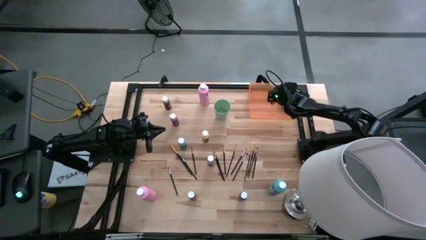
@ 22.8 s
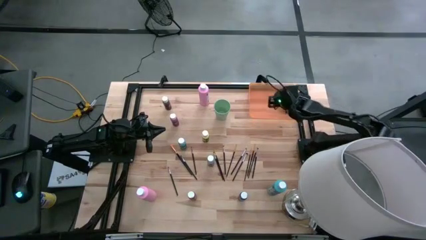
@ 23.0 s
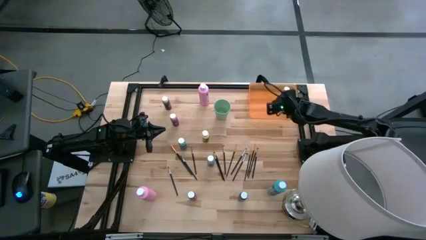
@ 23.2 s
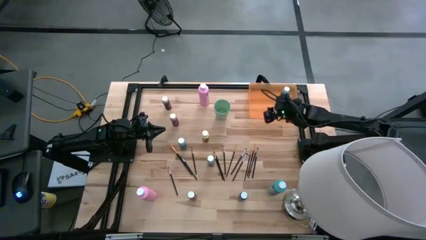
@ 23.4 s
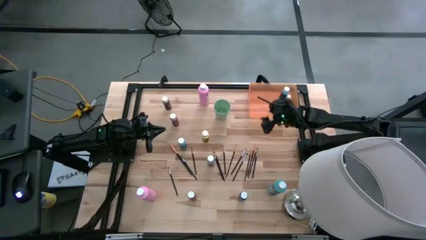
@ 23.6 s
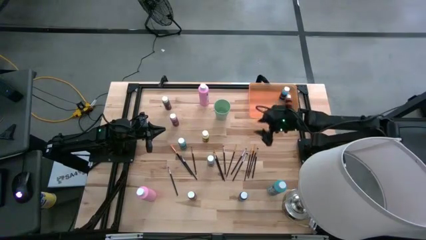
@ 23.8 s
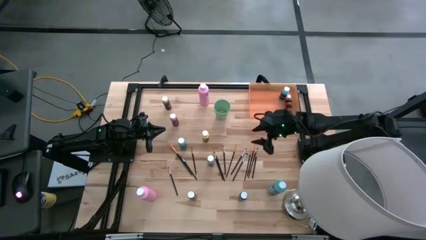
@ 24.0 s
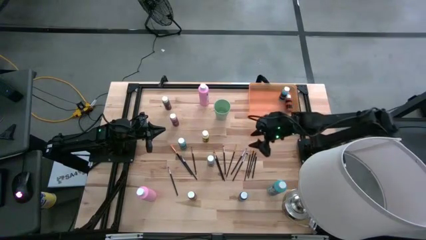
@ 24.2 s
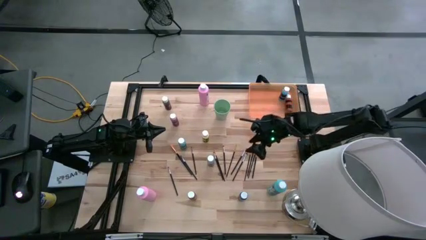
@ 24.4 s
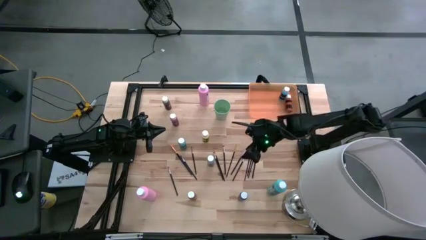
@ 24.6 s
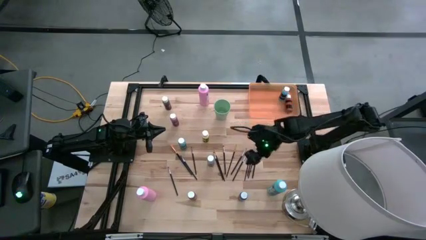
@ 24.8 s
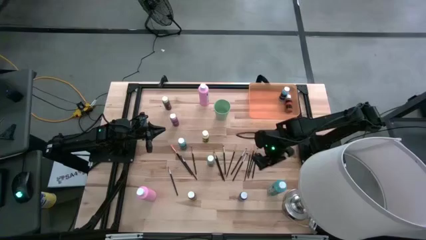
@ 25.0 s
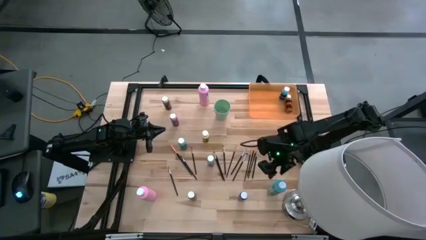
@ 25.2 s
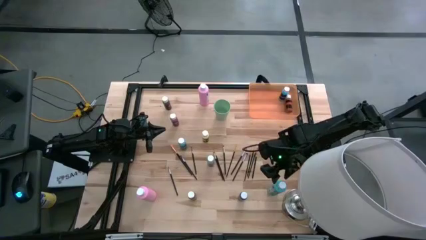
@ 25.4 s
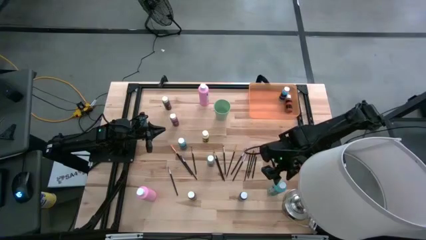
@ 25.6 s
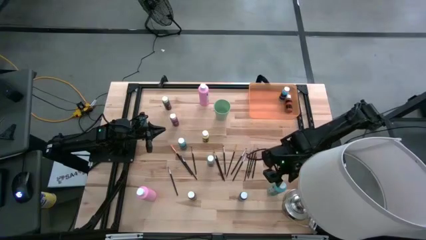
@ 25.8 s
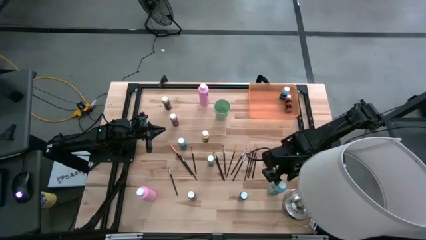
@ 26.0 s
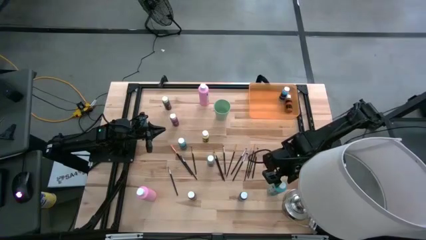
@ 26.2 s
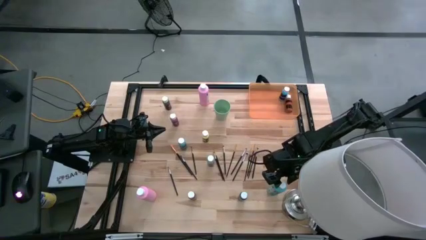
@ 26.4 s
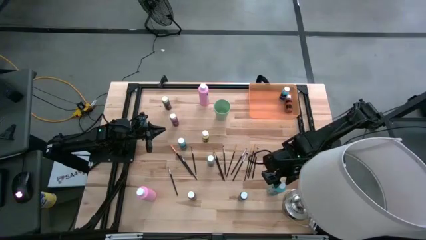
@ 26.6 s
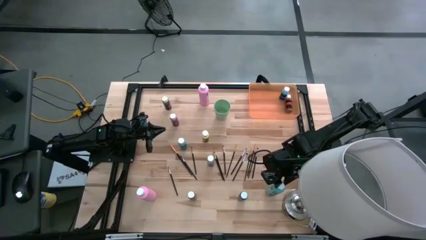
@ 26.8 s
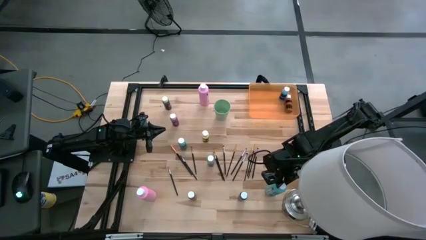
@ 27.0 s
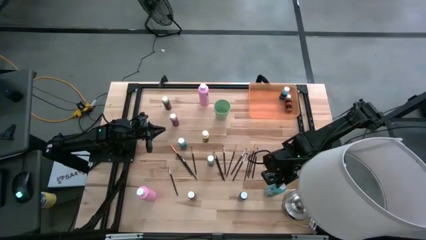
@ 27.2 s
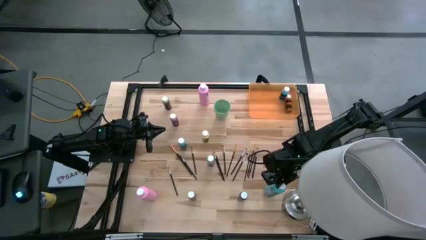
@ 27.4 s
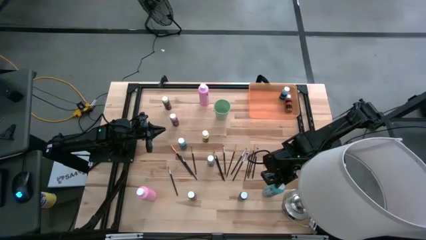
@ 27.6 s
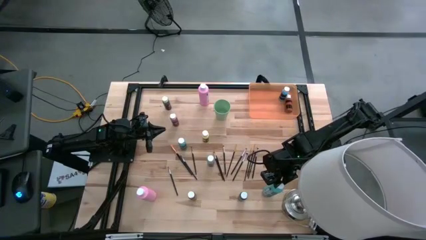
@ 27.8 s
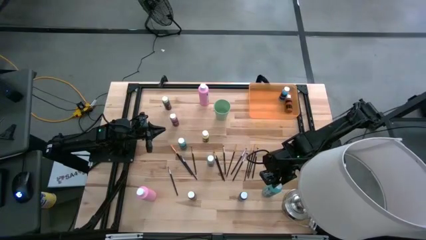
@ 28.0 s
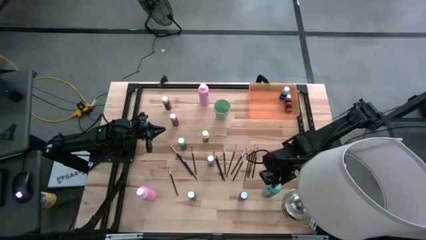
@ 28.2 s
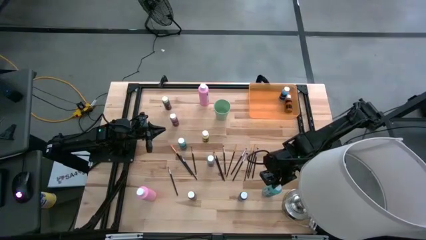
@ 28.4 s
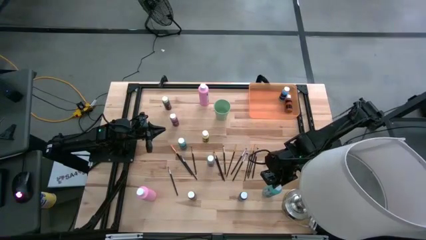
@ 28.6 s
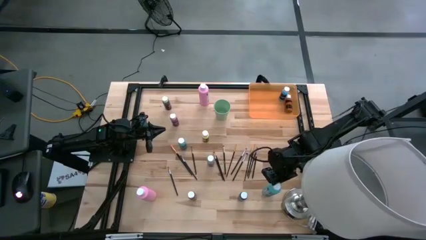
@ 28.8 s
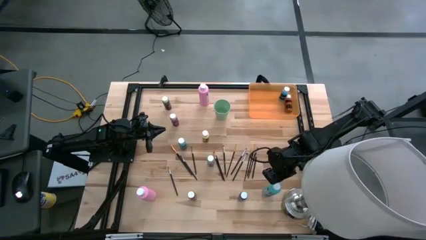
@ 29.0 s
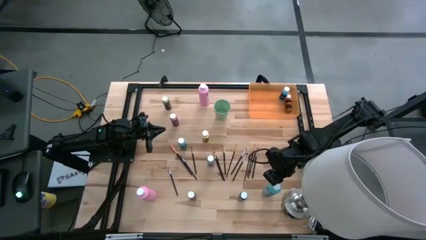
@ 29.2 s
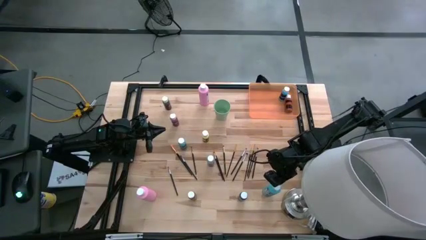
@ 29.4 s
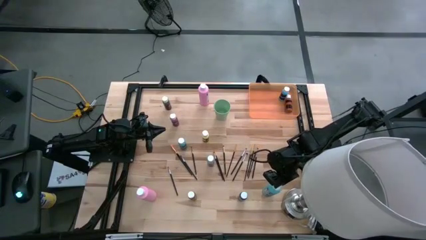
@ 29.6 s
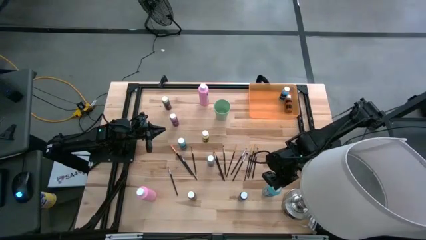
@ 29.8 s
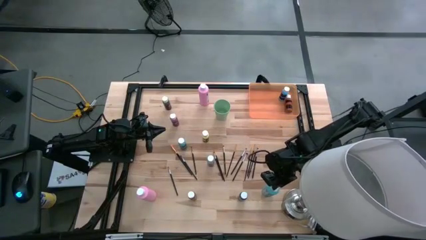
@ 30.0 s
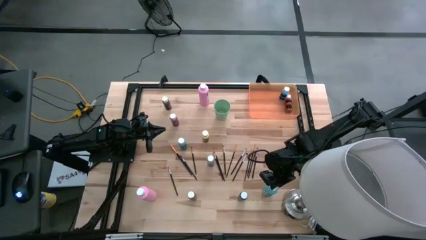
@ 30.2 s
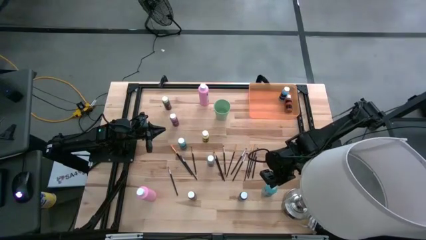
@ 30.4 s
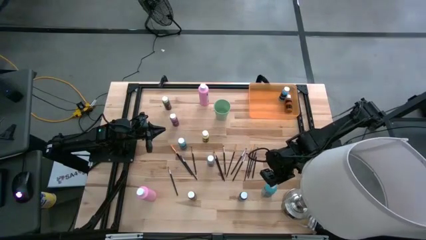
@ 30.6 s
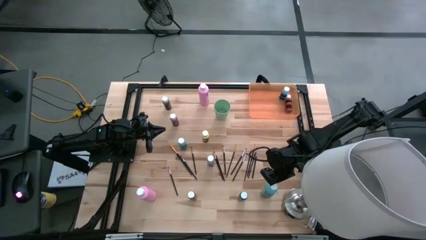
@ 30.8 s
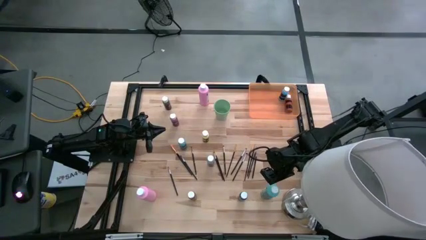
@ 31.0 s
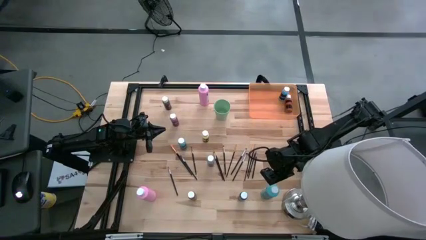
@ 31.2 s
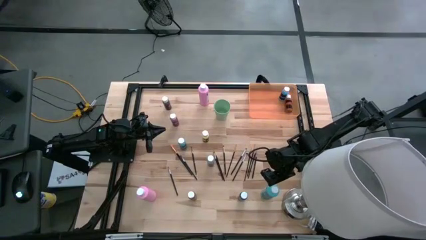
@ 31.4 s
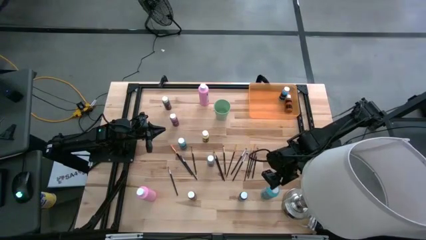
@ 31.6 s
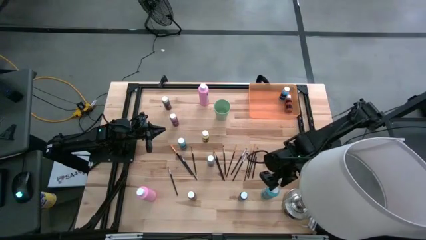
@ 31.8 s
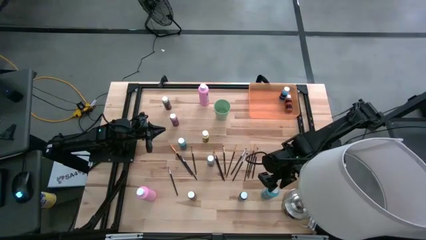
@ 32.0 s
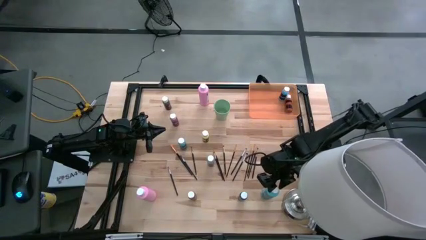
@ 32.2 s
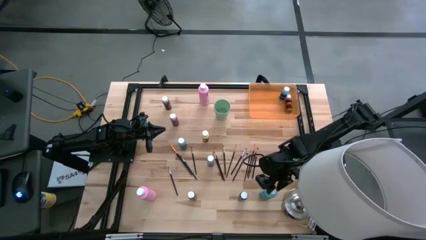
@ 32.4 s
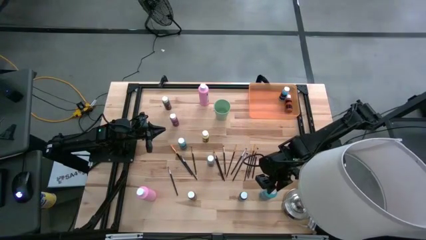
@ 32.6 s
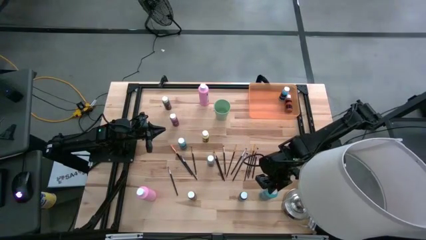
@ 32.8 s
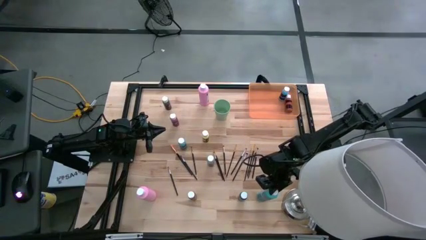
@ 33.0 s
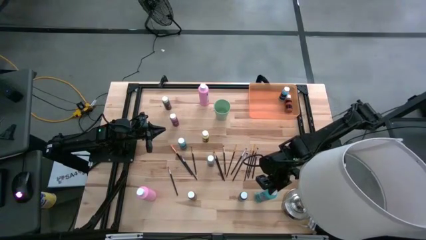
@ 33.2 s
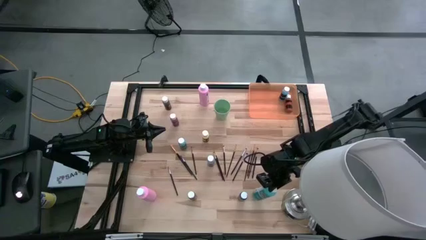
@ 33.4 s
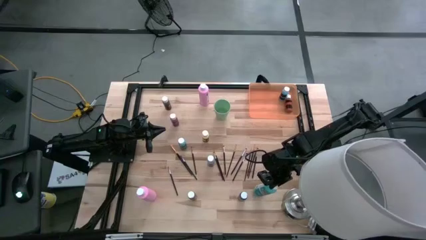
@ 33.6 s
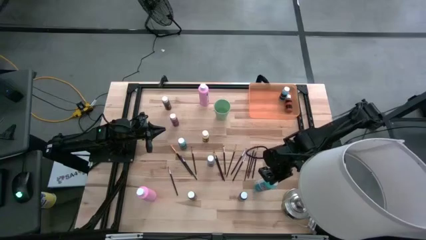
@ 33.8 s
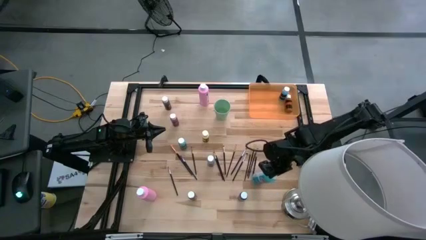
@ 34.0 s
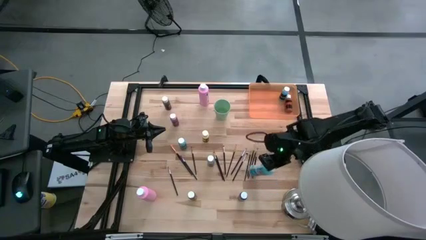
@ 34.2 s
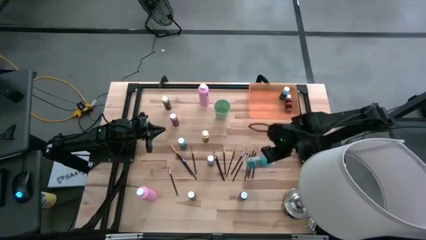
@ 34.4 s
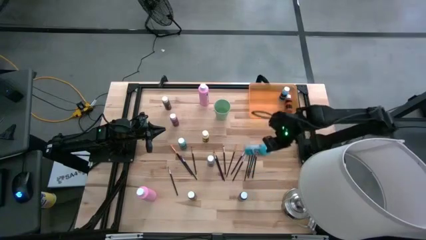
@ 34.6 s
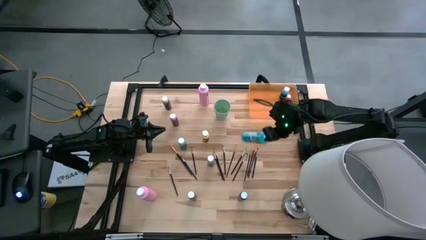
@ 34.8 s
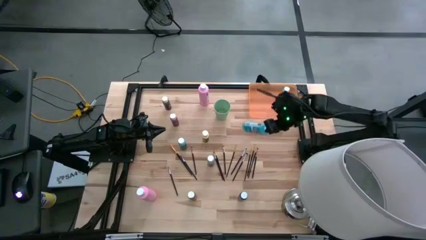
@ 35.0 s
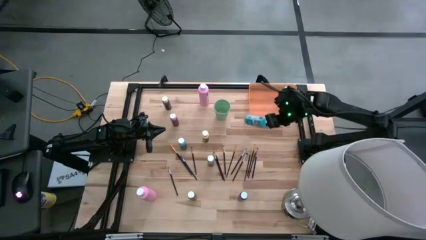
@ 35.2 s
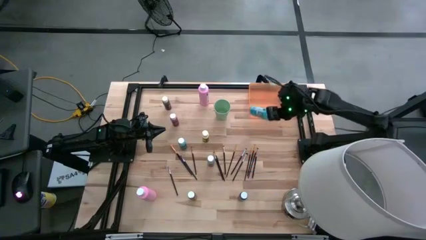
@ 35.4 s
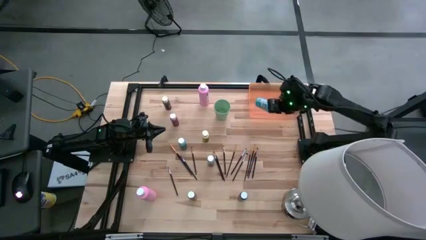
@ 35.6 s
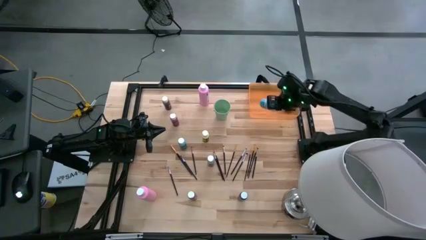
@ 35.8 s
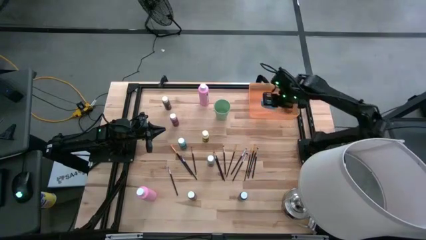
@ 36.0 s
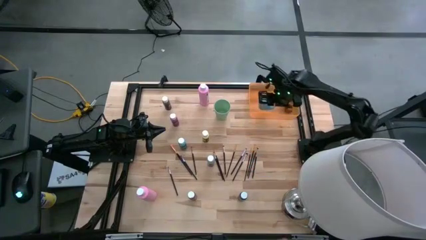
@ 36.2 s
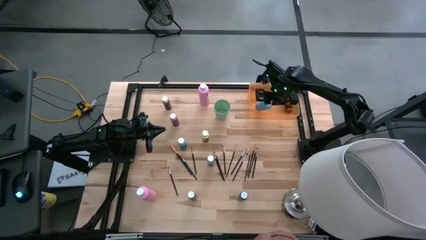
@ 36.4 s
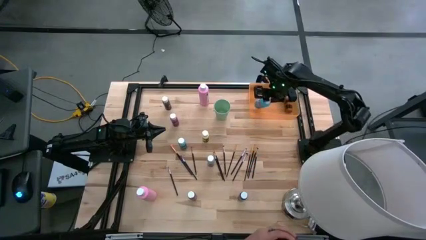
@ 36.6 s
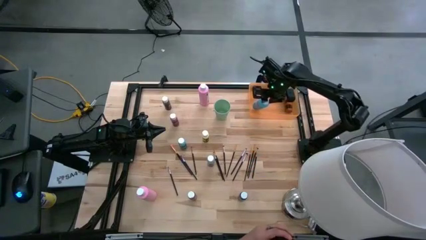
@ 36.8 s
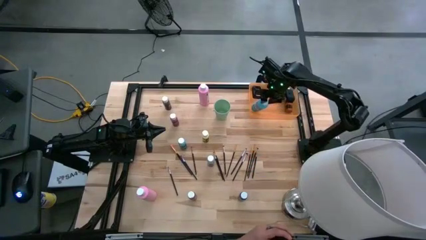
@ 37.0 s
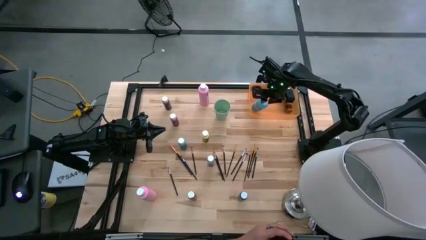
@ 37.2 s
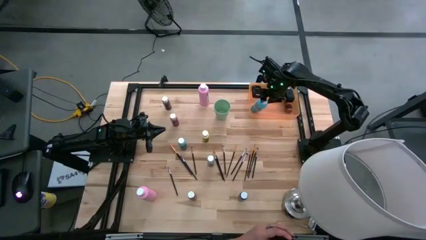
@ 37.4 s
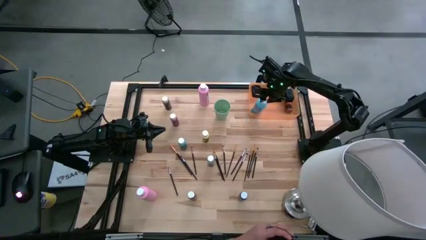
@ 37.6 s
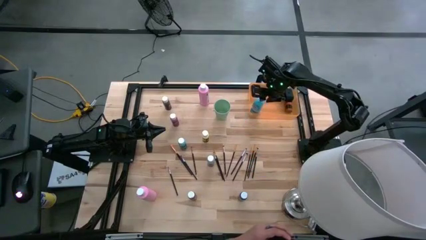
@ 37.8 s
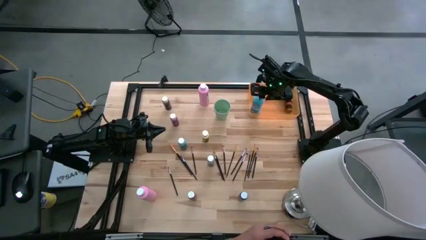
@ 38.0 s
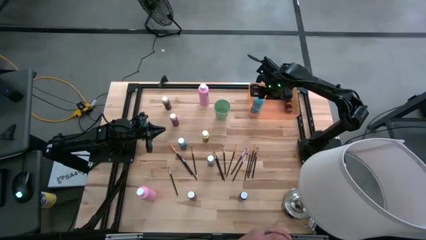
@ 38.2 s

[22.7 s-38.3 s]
Task: Pick & Place Paint Supplies
Put the large blue paint bottle into the orange bin
